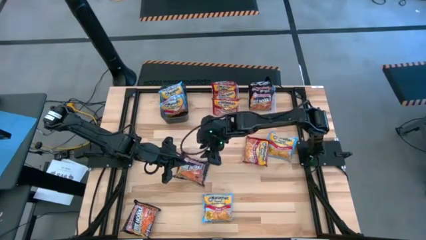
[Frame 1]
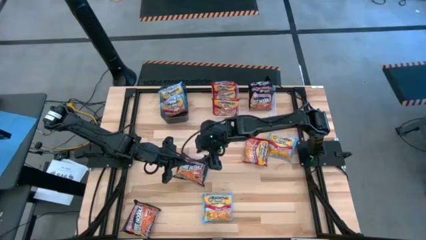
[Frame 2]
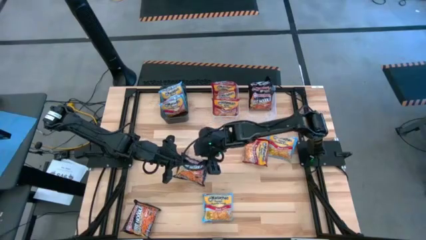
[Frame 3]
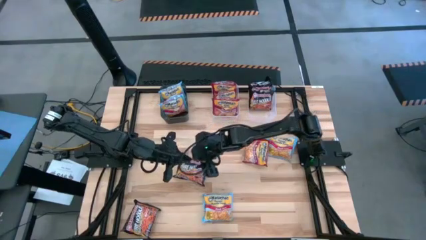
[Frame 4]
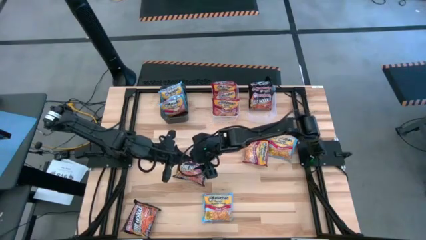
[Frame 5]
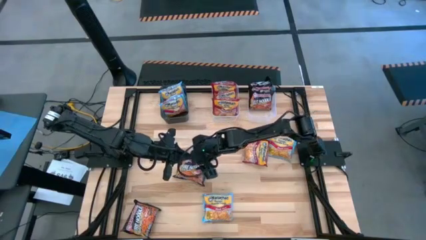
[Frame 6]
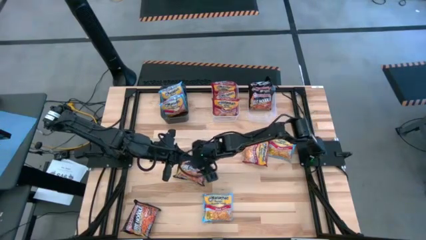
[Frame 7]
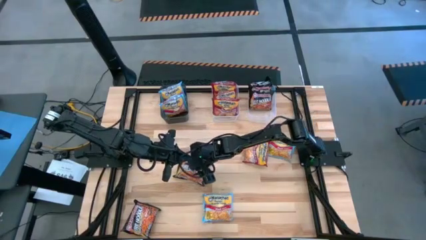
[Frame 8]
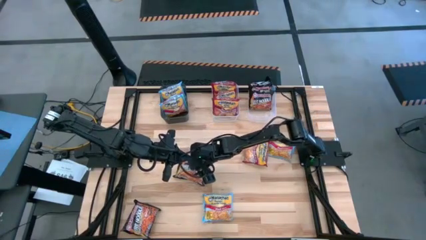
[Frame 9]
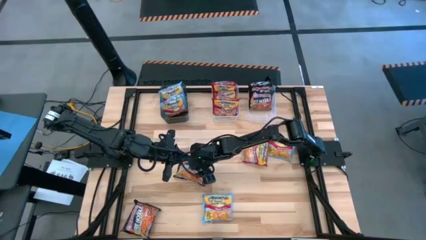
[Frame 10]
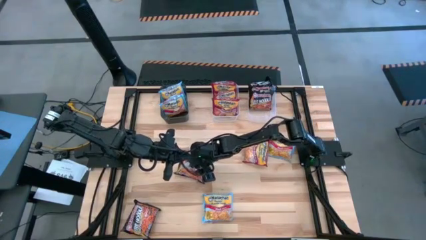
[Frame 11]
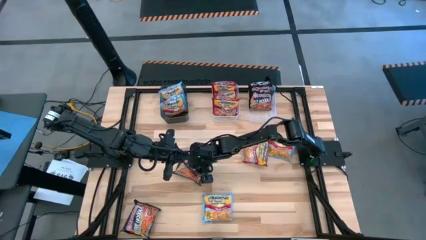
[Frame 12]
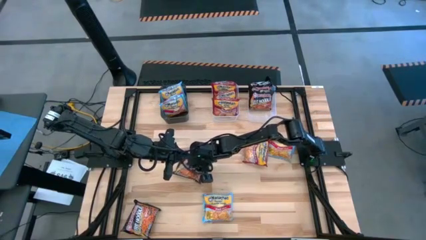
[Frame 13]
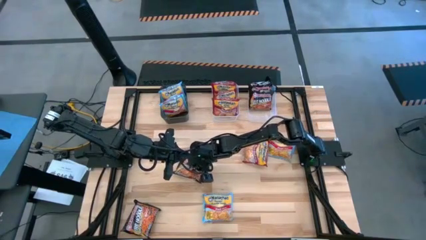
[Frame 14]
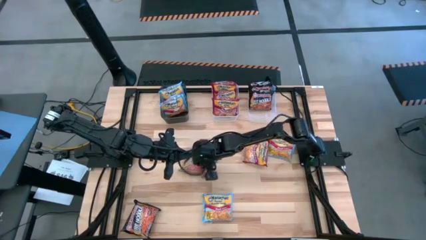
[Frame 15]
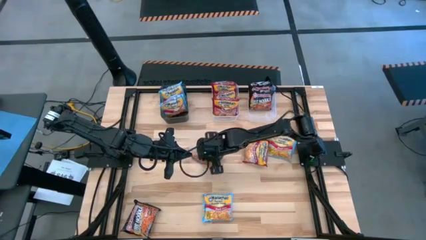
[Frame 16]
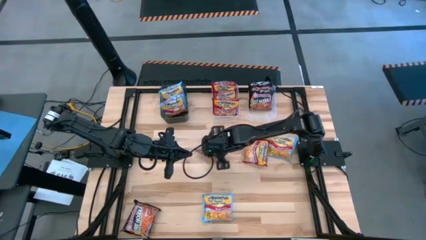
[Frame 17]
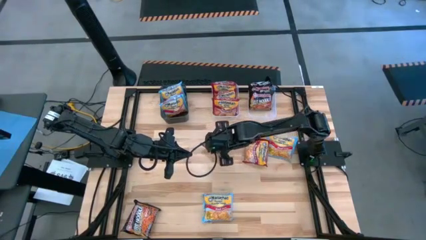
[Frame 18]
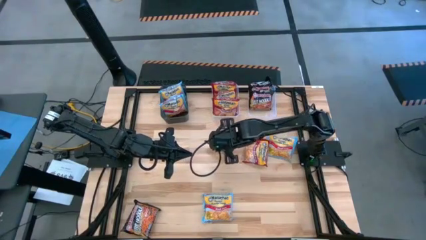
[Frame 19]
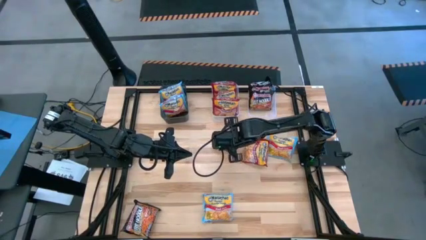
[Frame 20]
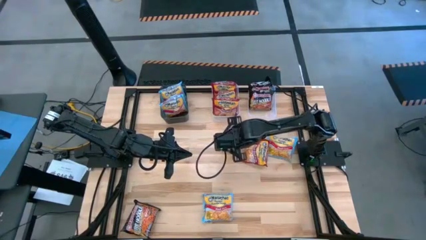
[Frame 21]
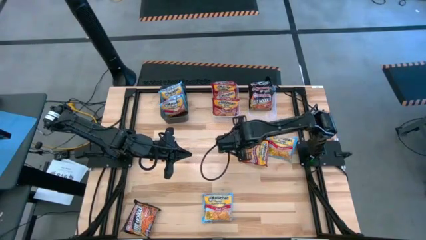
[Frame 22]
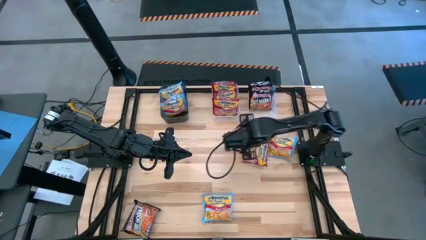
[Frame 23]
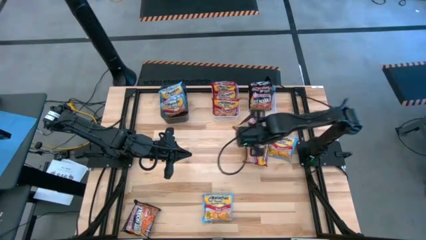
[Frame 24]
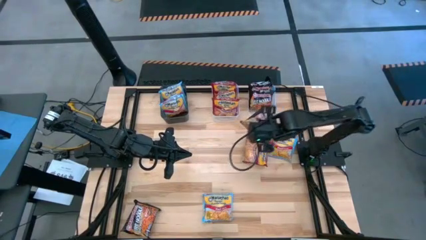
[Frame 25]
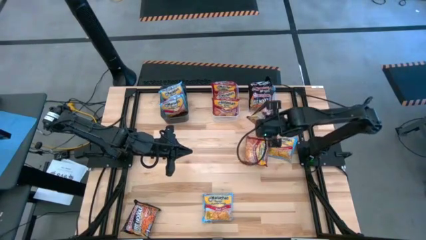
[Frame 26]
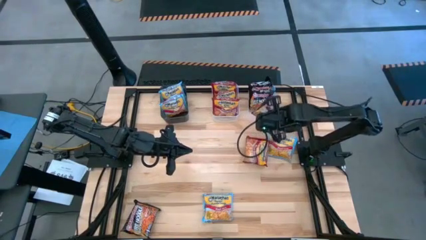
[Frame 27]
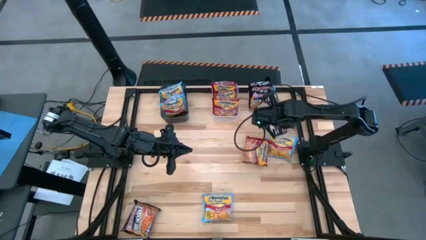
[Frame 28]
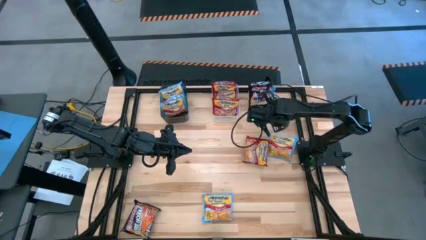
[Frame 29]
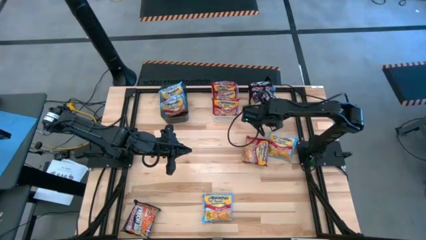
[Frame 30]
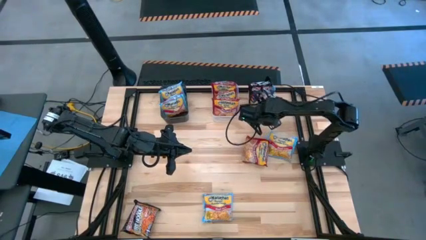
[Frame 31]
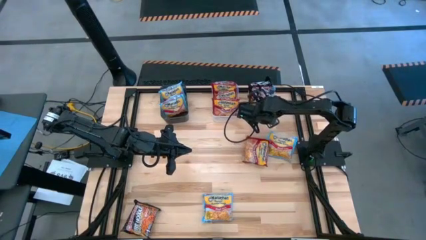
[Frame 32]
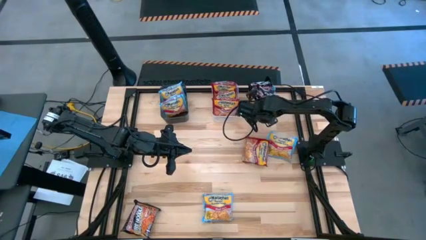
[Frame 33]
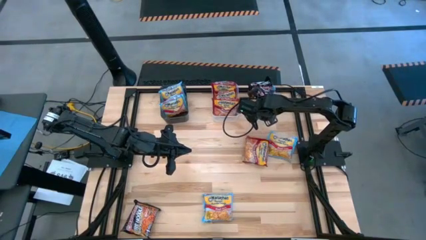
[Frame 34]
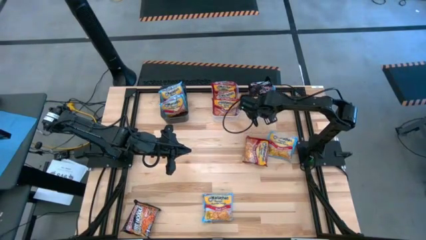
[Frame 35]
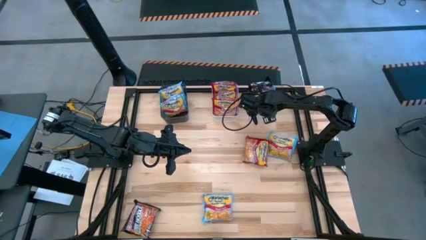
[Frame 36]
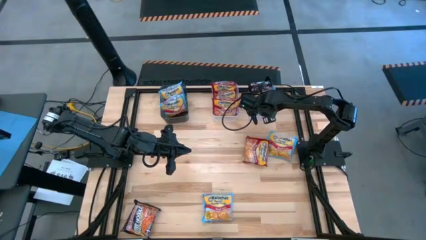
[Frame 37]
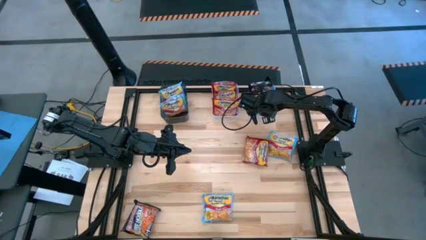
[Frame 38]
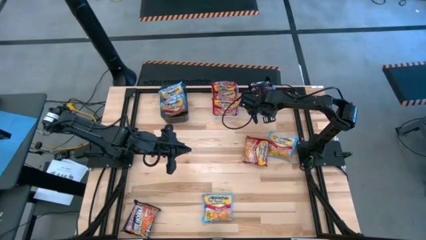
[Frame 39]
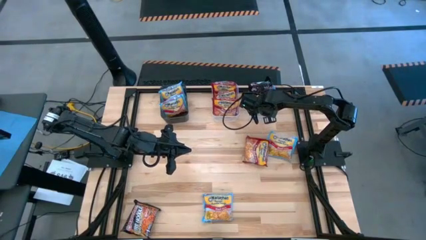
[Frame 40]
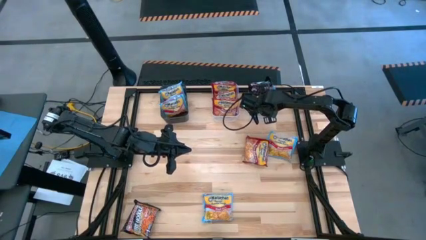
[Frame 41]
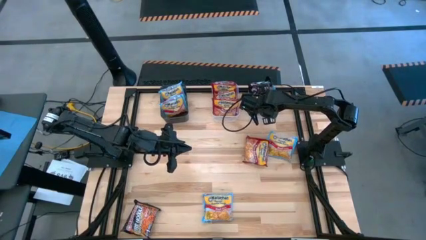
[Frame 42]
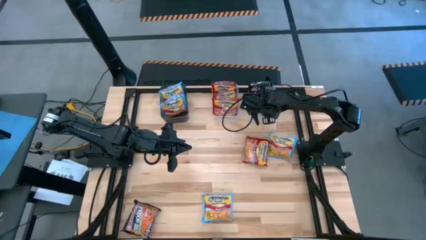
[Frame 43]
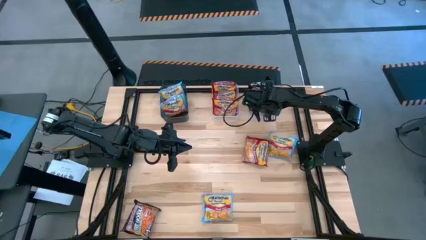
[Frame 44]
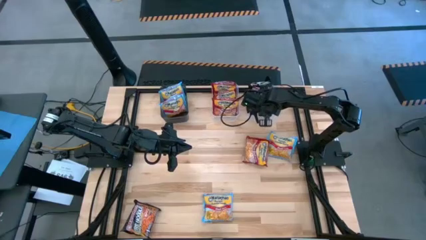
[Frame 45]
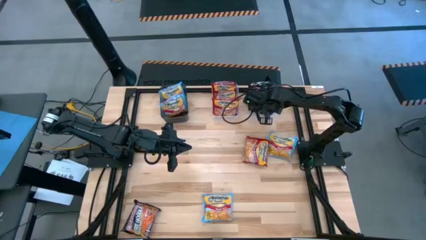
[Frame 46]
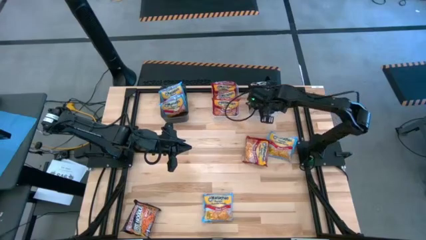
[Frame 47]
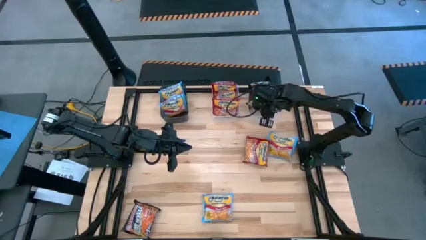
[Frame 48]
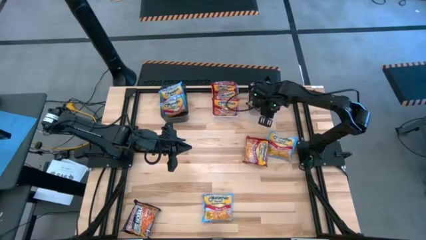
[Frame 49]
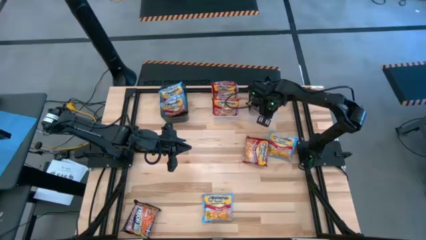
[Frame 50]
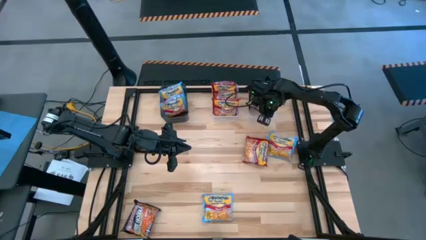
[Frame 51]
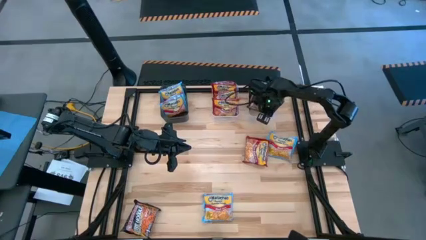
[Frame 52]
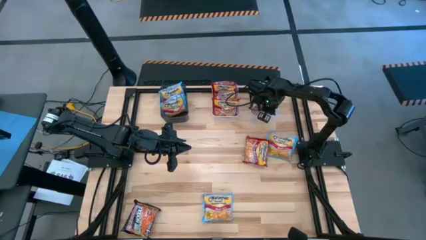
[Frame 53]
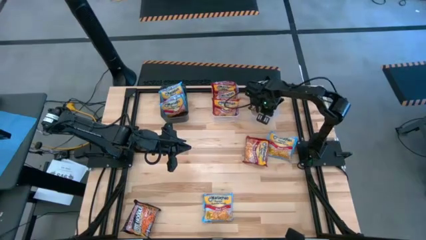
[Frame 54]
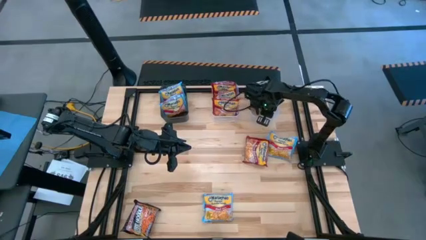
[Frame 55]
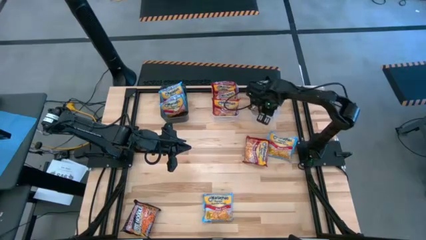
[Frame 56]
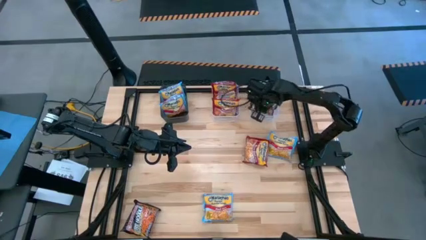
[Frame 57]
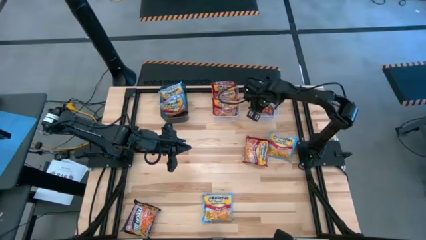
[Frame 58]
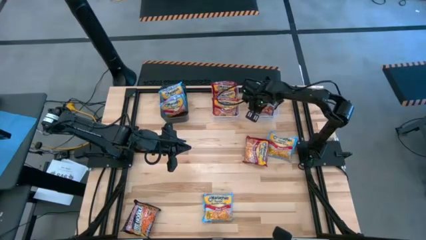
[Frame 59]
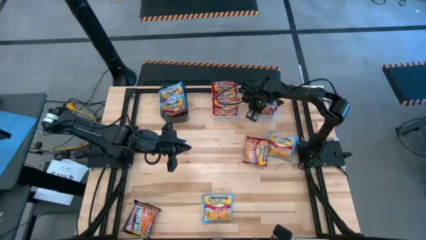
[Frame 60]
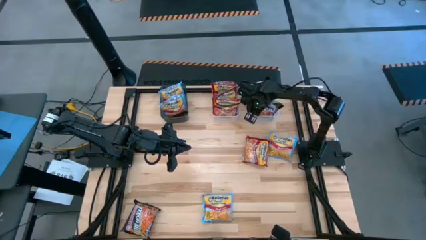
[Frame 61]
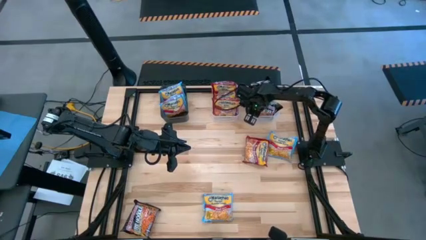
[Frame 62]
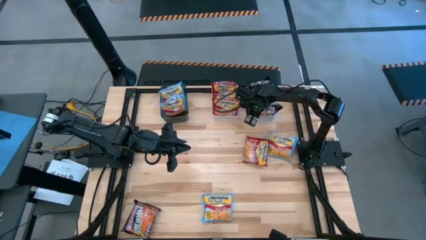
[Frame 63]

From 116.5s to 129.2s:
Task: Sort Maruchan noodles
Put the black noodle pack into the right transparent bin

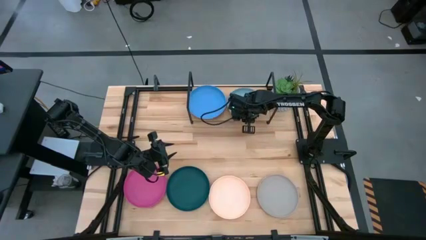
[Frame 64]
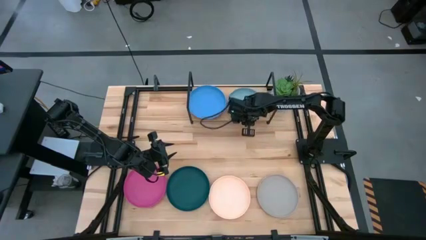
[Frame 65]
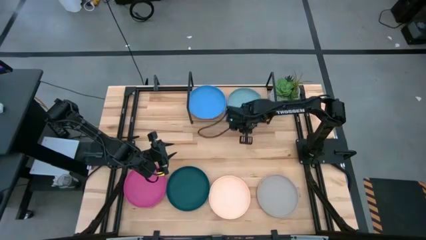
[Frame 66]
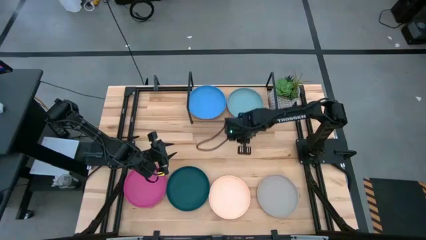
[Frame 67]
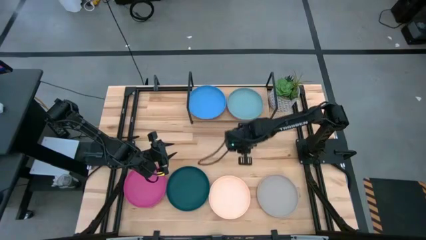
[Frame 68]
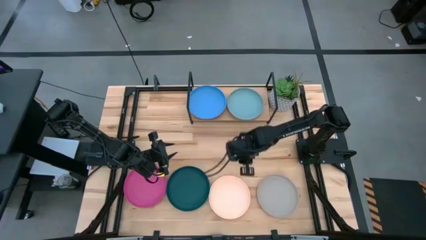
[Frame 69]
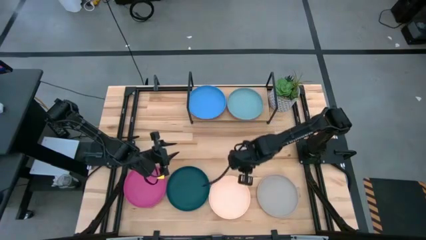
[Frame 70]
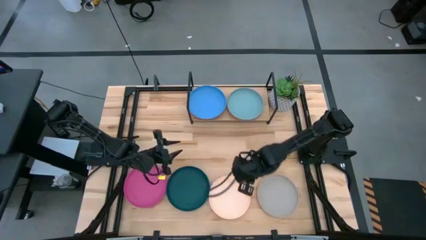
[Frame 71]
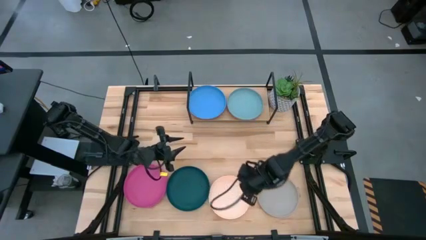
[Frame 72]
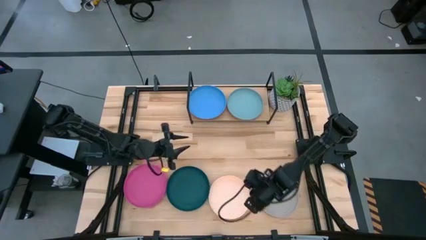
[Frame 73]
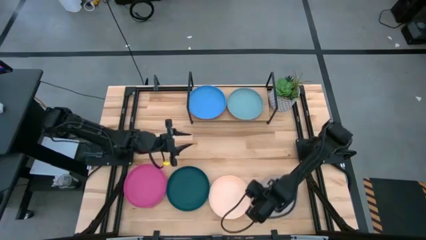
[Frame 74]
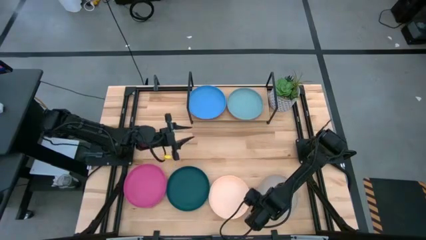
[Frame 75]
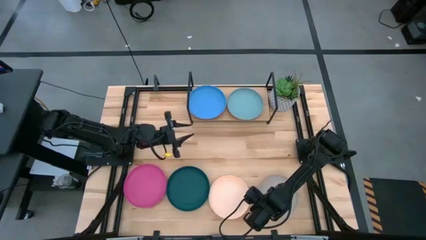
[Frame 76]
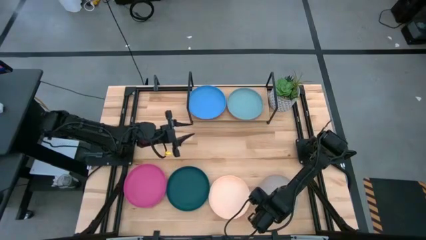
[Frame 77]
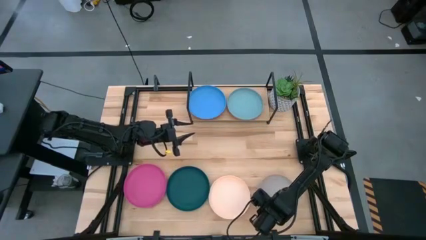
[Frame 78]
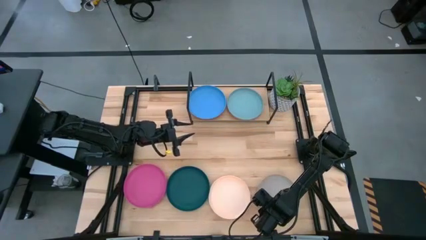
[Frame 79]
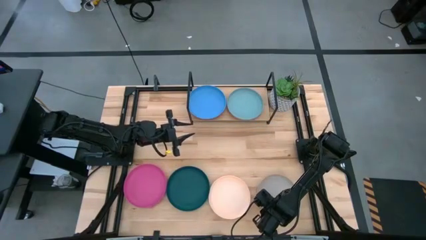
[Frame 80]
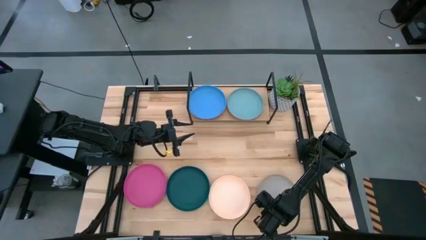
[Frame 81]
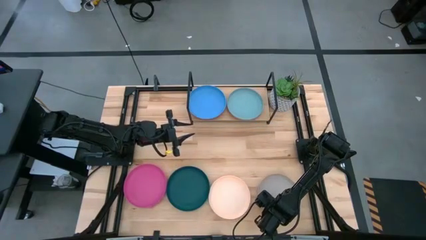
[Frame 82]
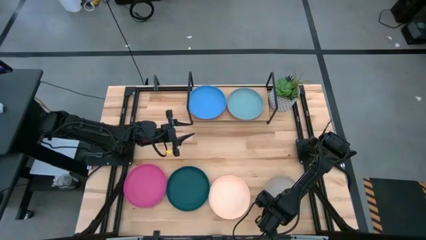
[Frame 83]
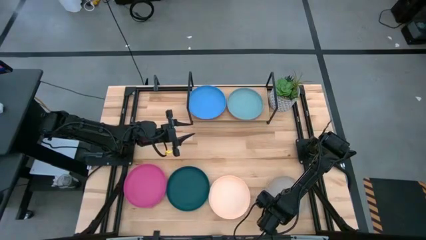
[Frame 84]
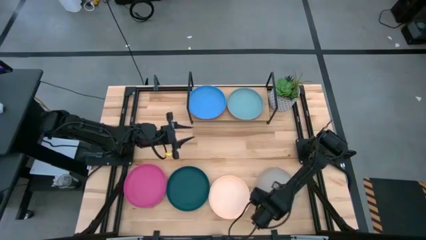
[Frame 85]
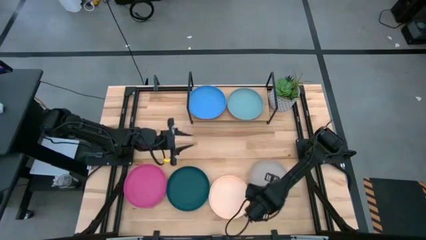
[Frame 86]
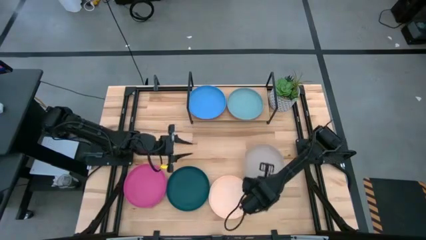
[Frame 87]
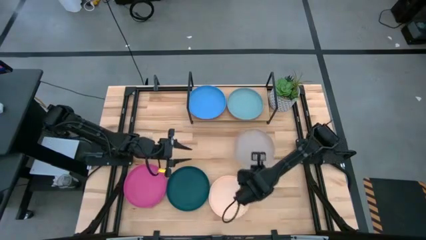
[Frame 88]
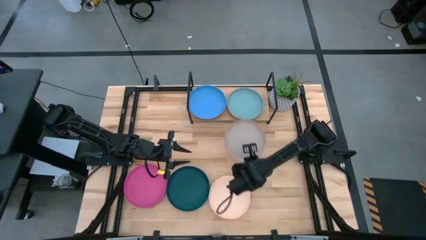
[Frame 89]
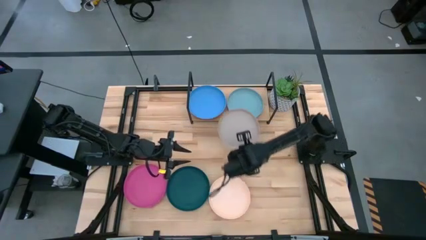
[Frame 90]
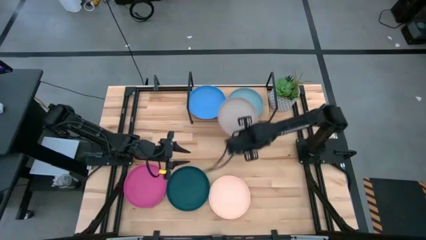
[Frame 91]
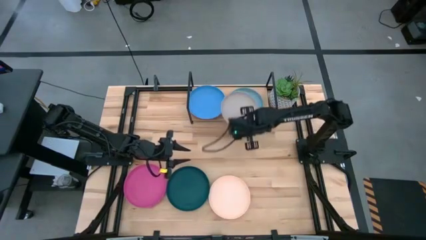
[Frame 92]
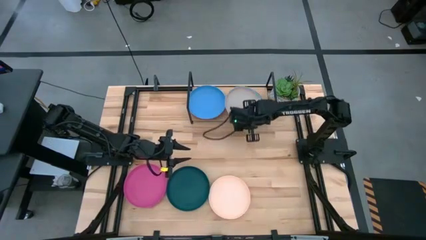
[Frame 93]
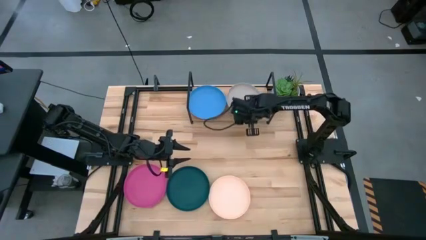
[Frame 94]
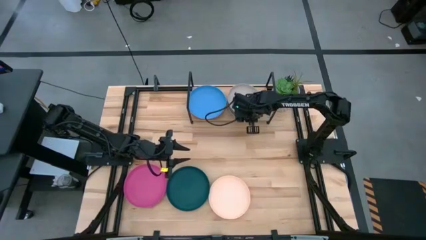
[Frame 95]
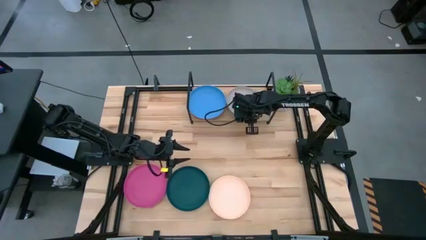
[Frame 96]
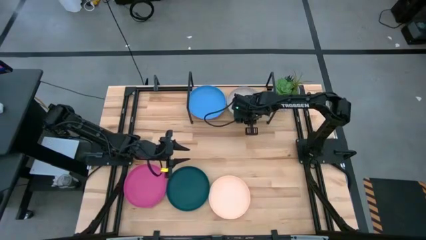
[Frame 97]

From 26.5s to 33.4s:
Task: Place and stack plates onto a shelf
Stack the gray plate on top of the light blue plate on the shelf
